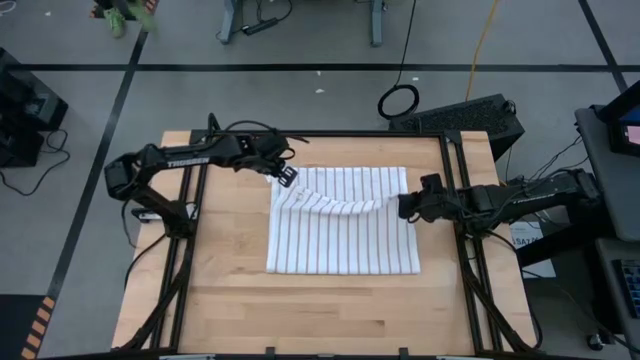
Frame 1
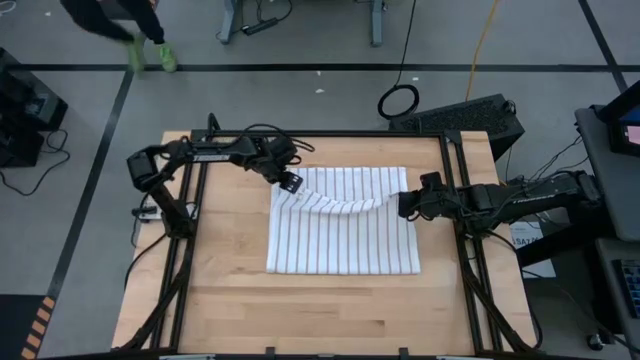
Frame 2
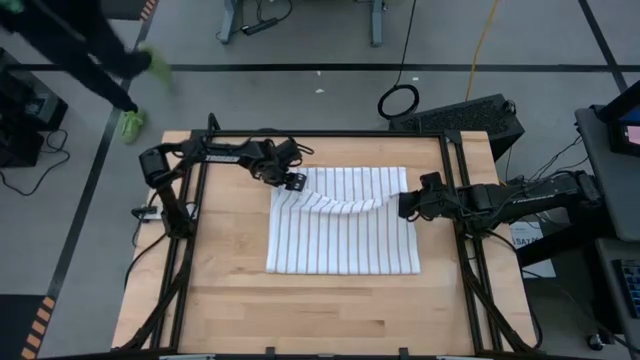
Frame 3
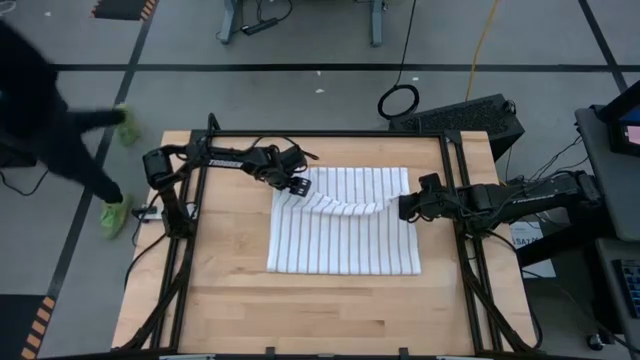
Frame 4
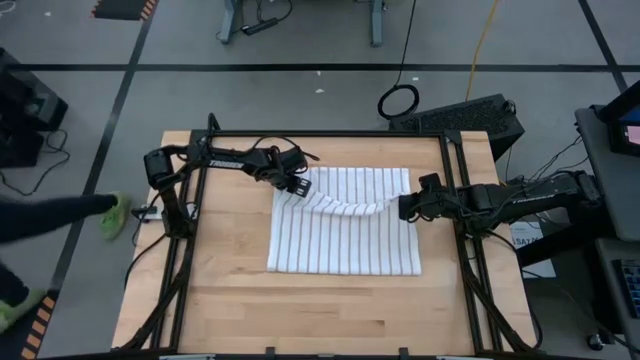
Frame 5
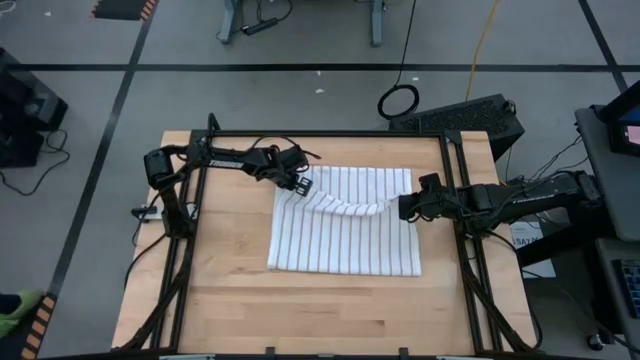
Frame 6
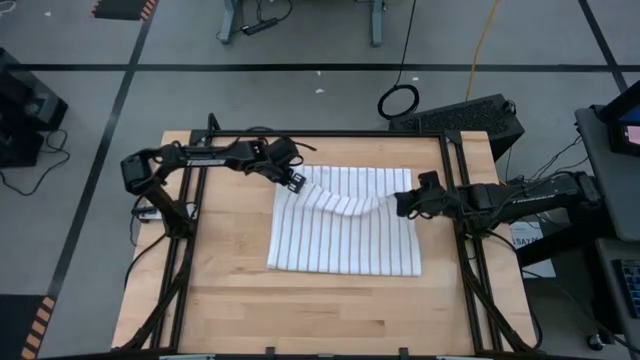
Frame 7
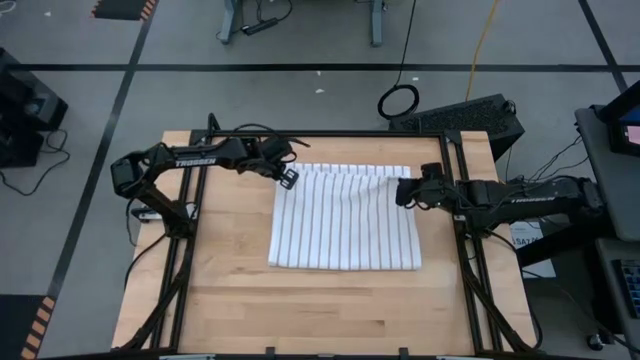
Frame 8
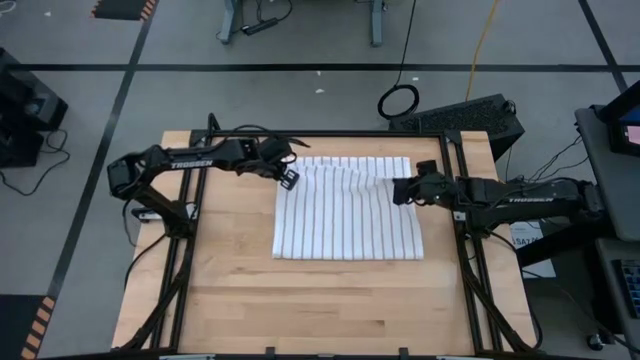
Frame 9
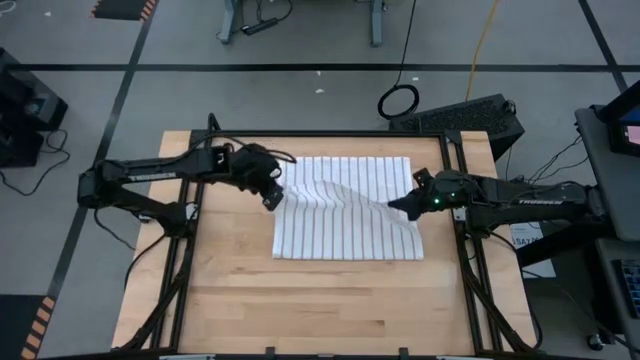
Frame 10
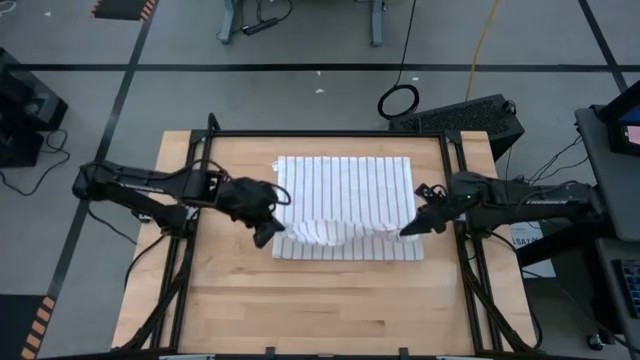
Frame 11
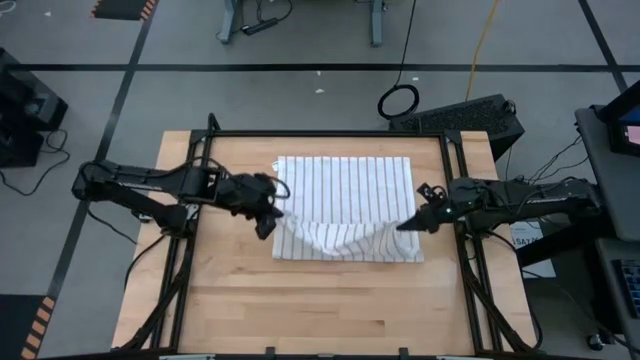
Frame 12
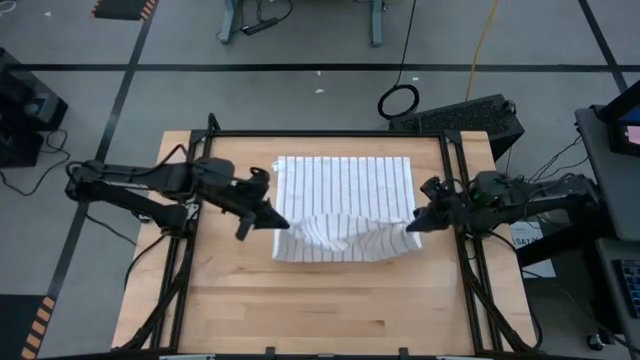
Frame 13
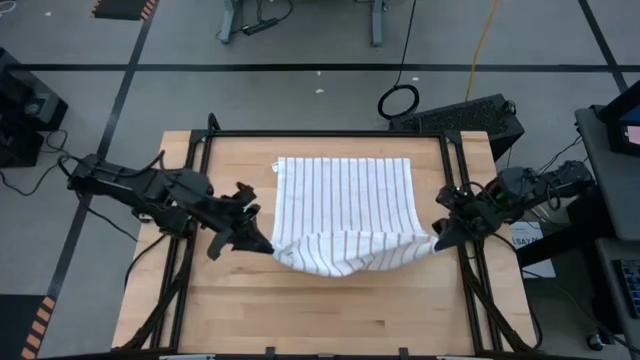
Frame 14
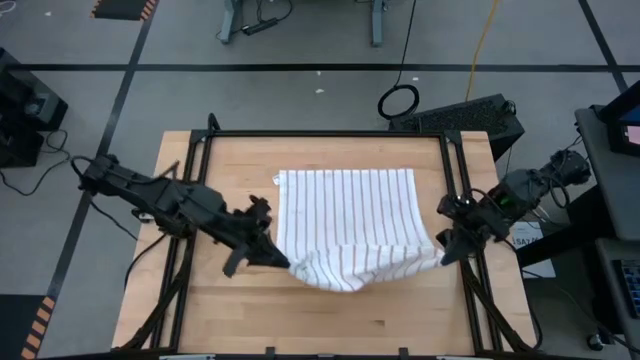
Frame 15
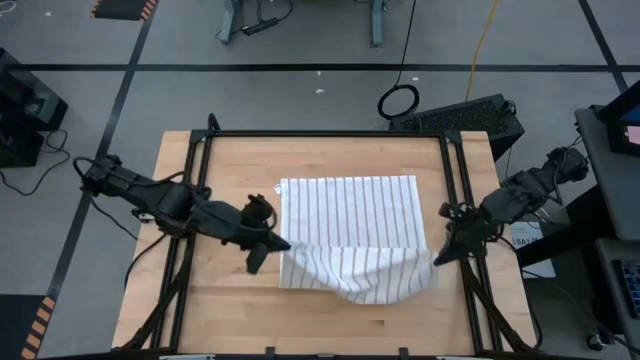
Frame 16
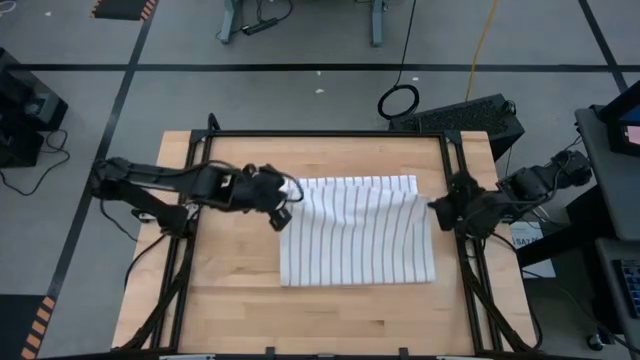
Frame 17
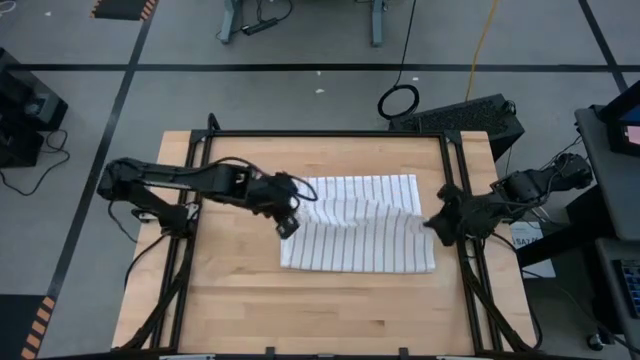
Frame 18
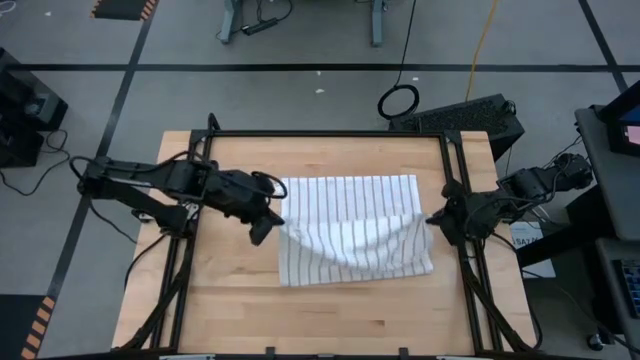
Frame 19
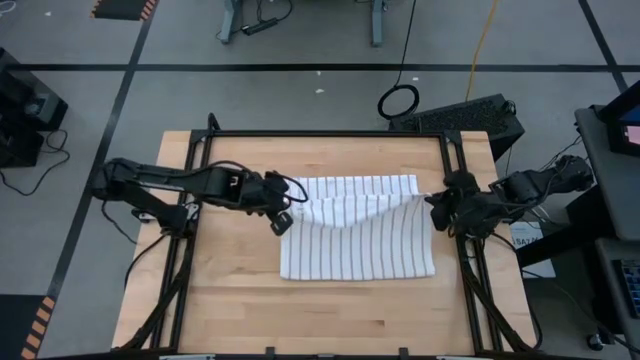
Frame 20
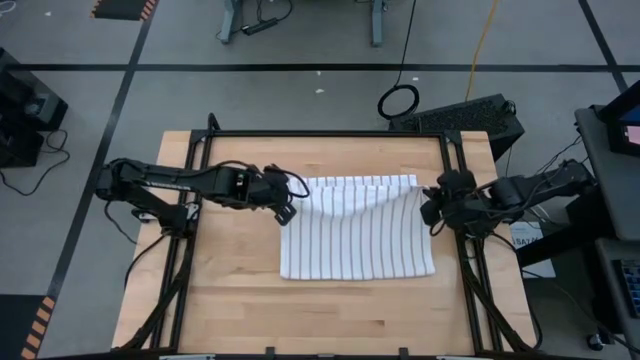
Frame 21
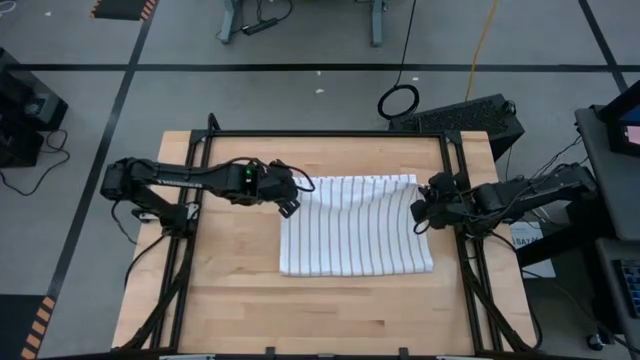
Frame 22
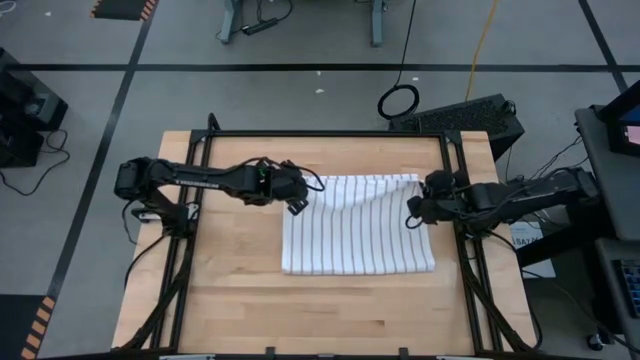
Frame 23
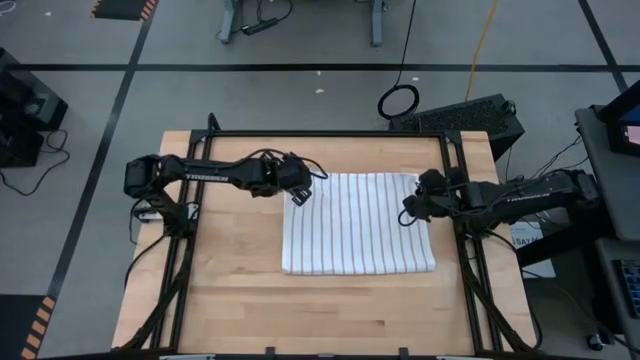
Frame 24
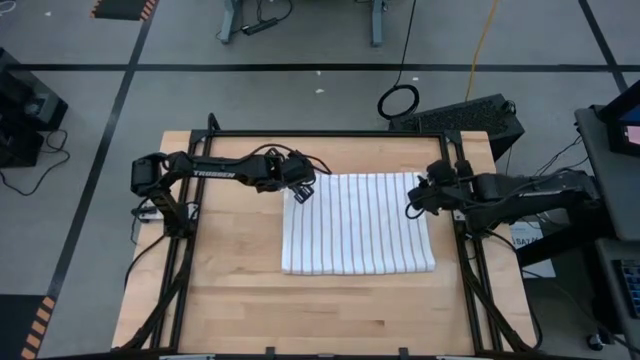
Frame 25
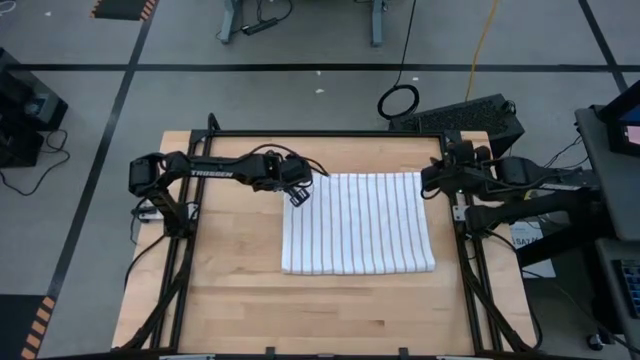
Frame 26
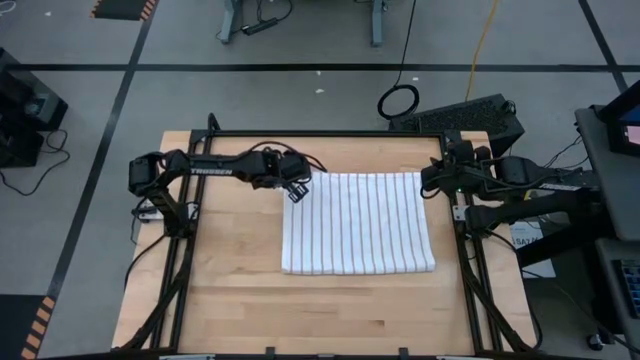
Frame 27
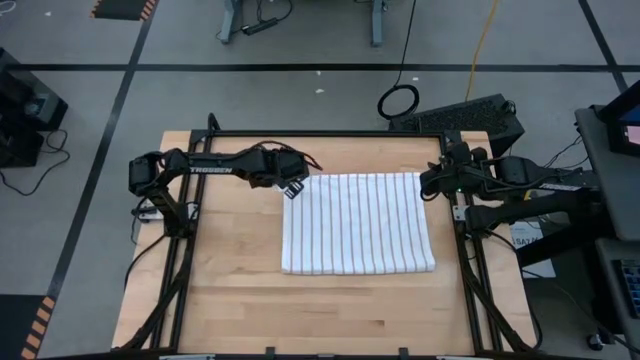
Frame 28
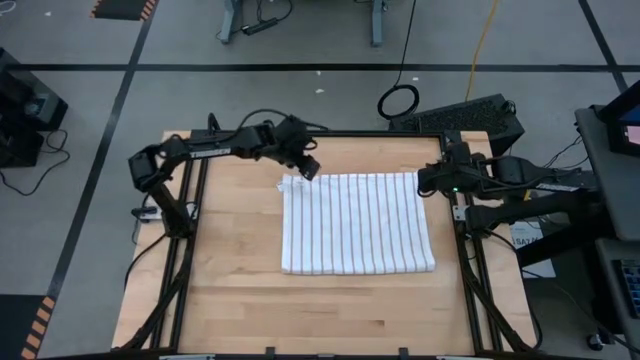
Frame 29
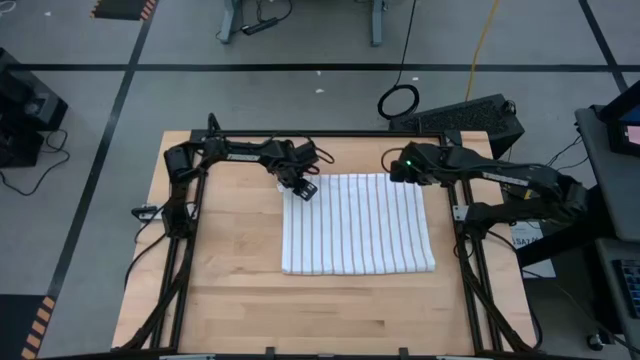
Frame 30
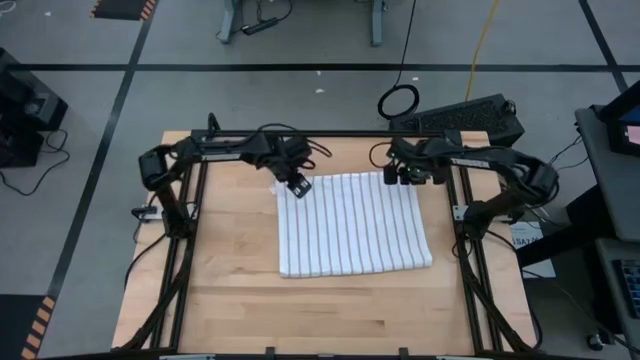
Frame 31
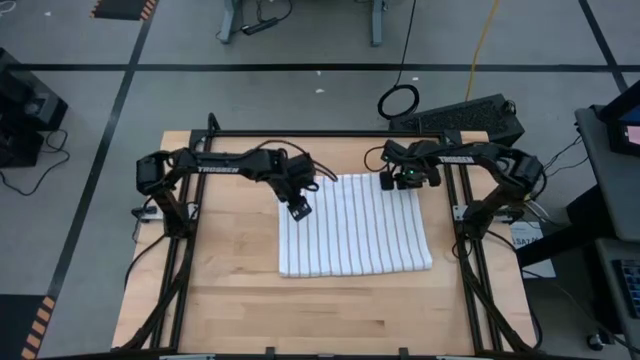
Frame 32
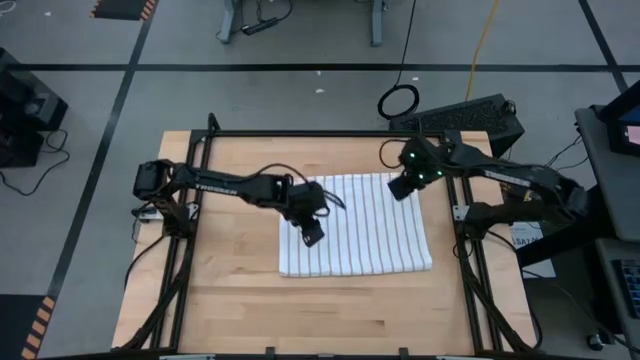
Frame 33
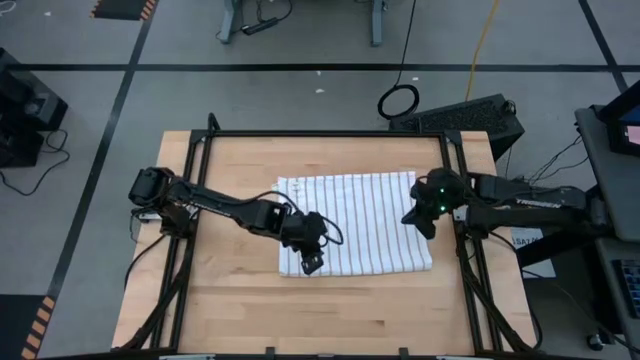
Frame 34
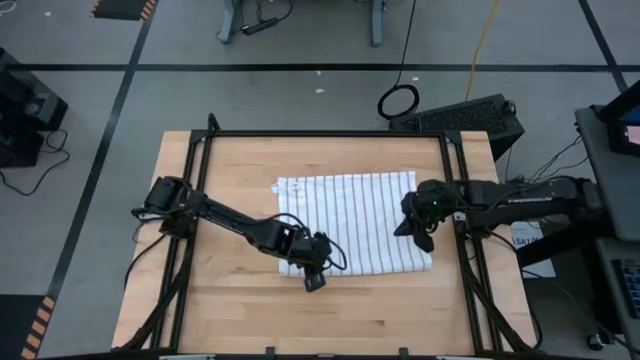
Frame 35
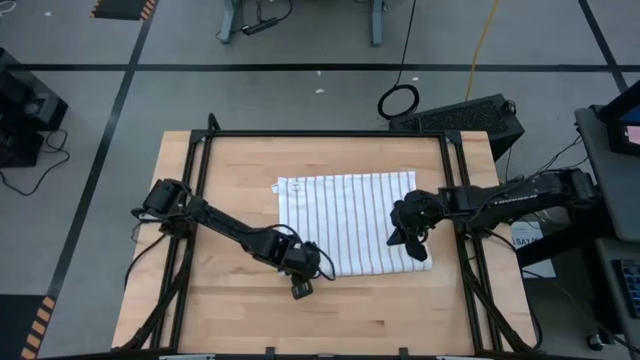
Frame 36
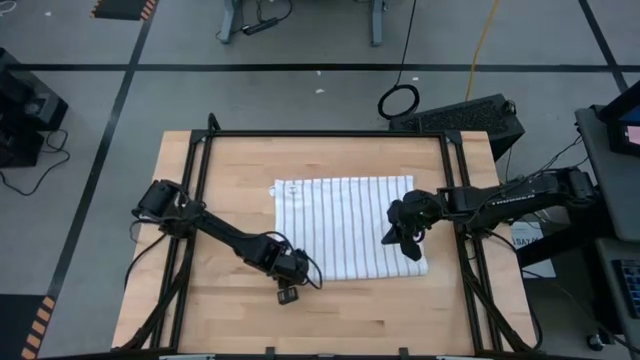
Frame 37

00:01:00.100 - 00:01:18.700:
Task: Roll towel
Roll the white towel

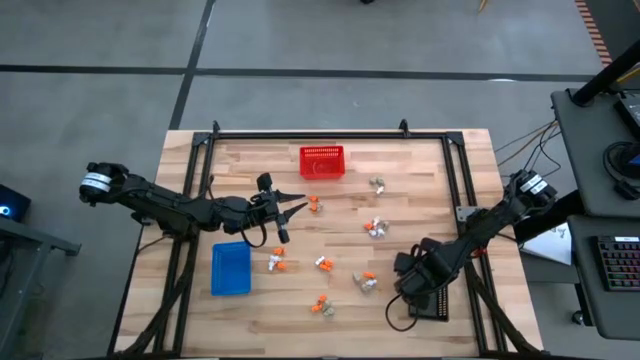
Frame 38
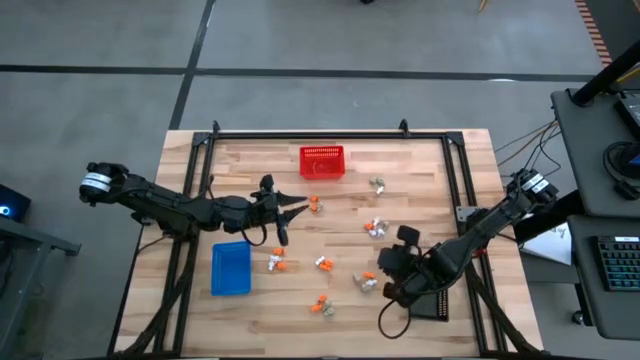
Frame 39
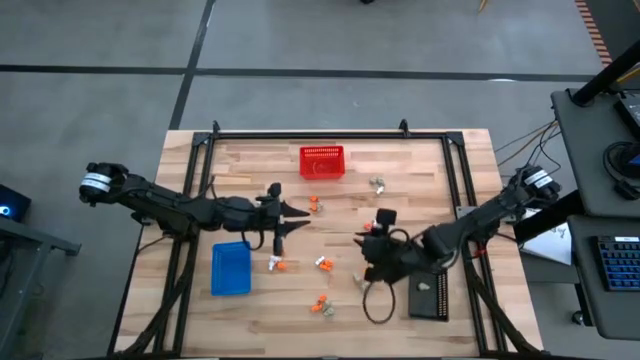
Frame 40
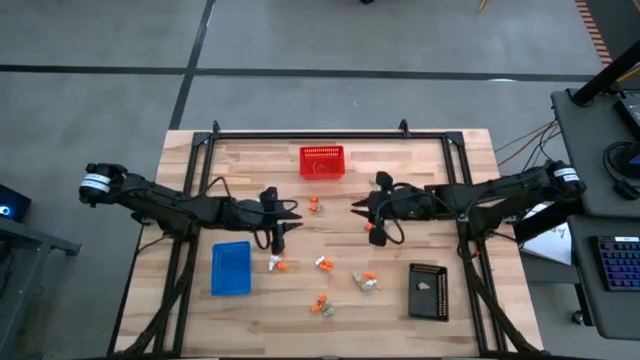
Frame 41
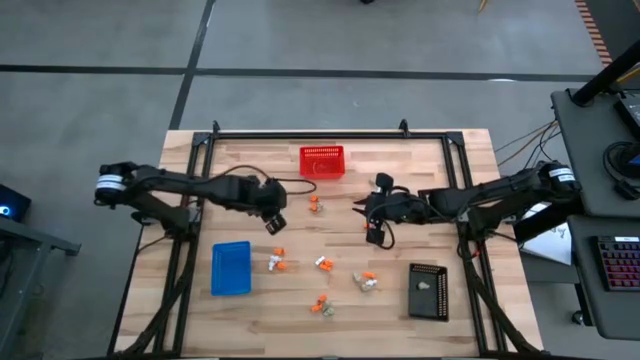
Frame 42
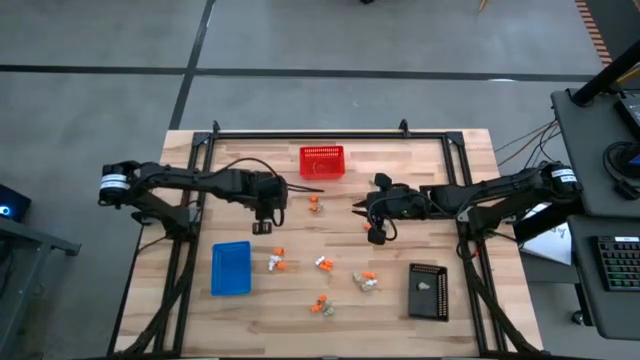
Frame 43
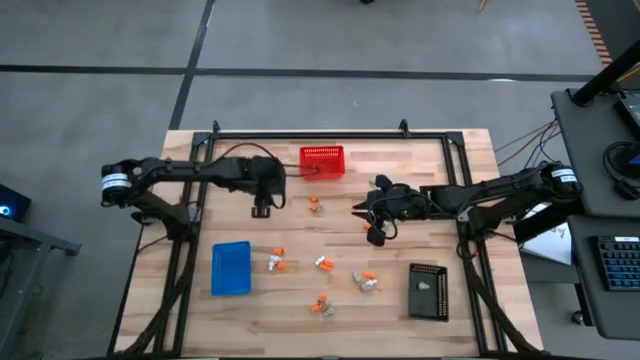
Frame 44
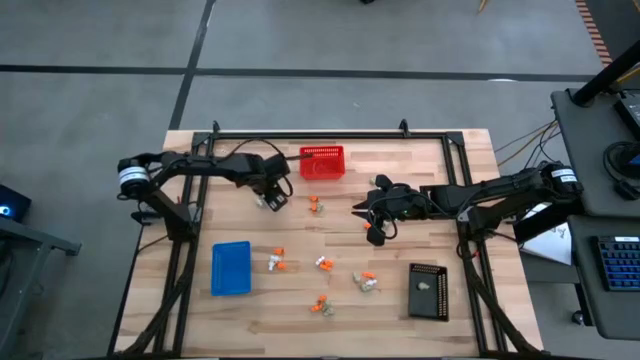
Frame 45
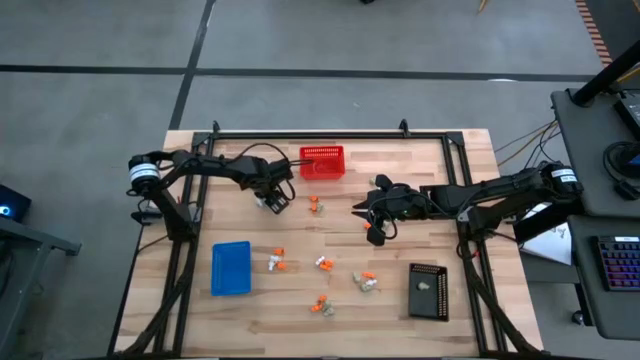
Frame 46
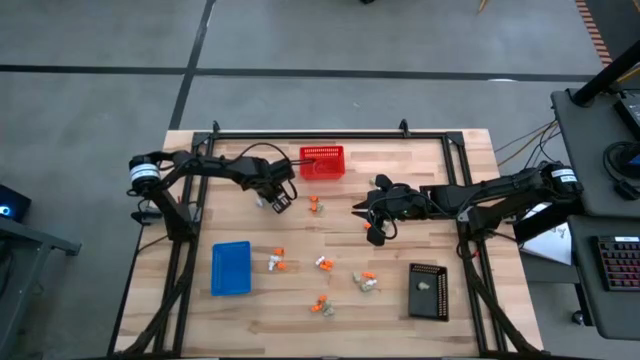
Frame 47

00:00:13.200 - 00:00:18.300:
Task: Sort Halloween decoration
Put the white skeleton toy into the blue bin
